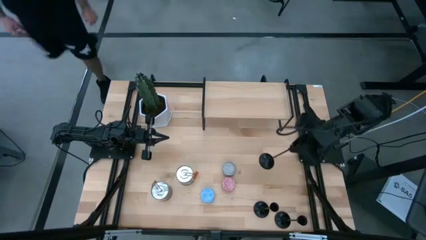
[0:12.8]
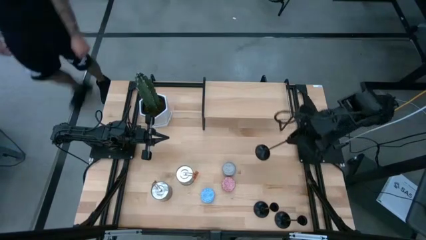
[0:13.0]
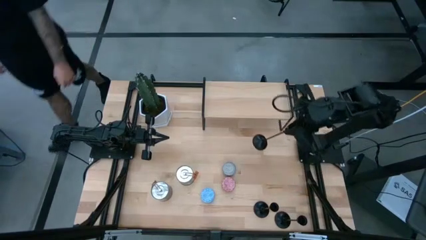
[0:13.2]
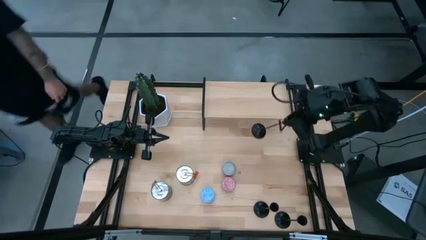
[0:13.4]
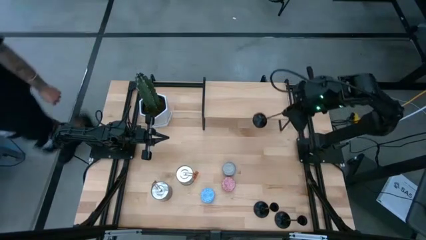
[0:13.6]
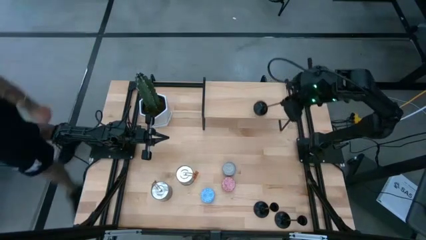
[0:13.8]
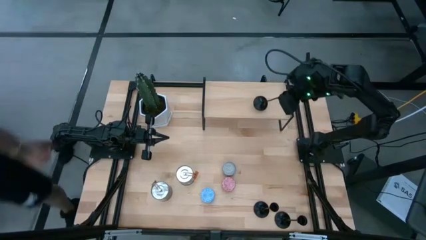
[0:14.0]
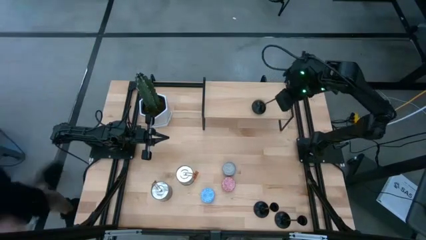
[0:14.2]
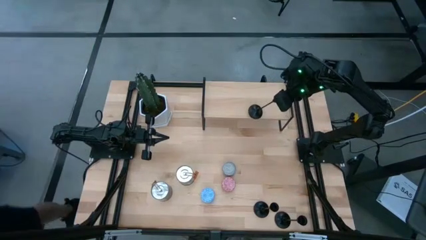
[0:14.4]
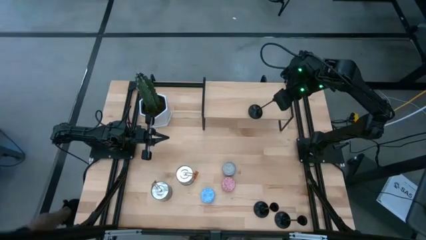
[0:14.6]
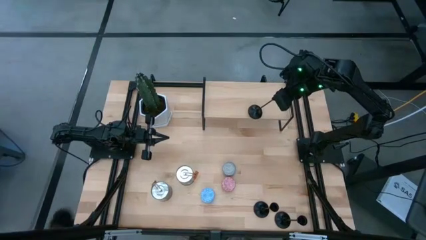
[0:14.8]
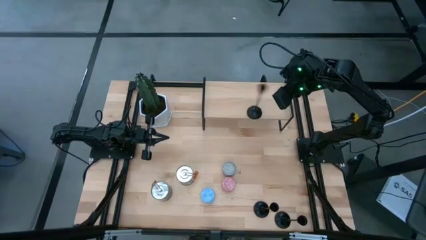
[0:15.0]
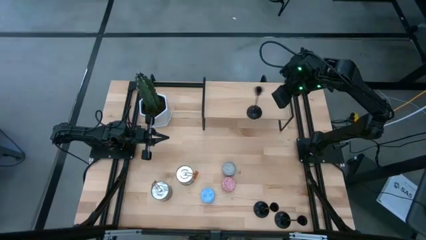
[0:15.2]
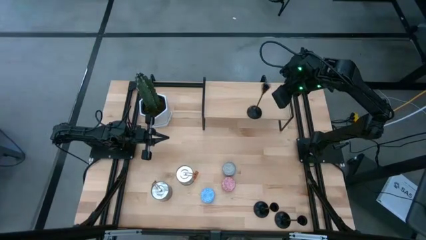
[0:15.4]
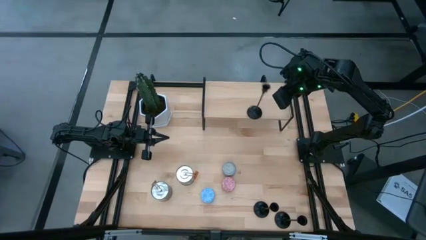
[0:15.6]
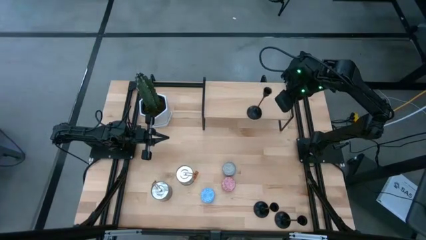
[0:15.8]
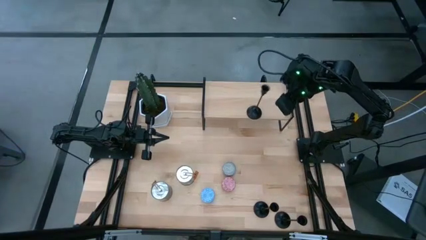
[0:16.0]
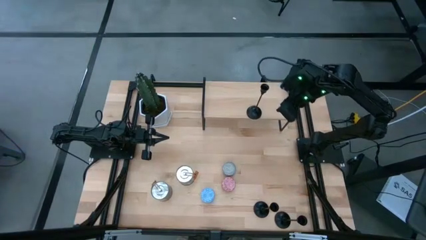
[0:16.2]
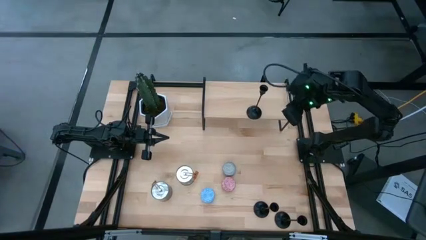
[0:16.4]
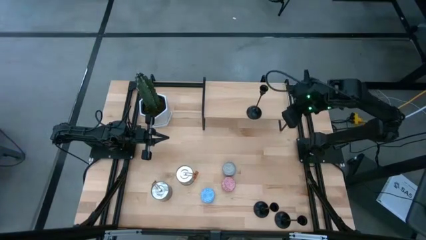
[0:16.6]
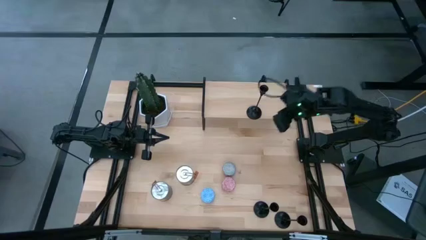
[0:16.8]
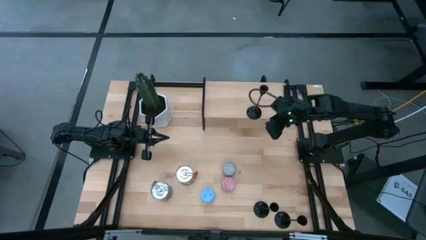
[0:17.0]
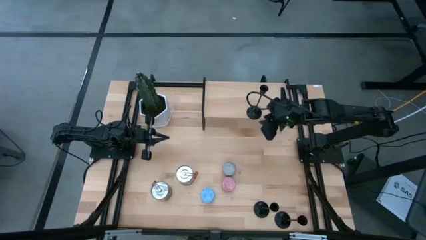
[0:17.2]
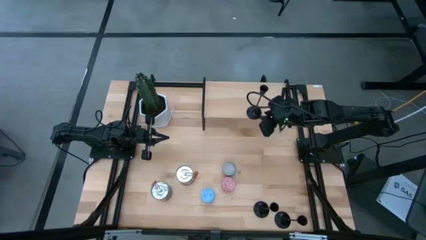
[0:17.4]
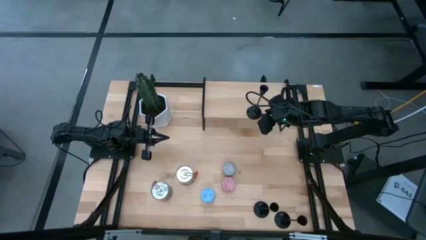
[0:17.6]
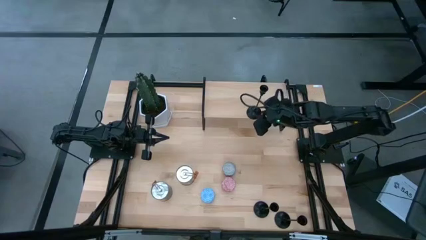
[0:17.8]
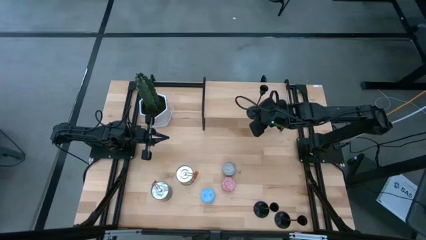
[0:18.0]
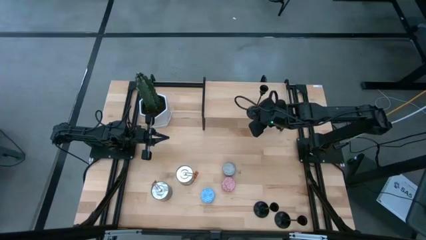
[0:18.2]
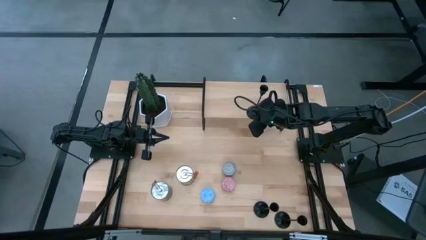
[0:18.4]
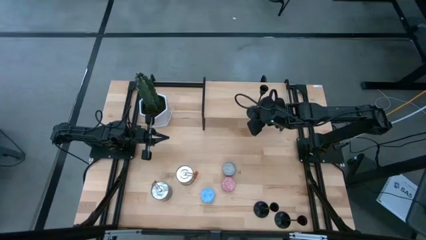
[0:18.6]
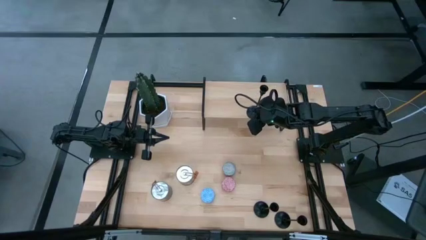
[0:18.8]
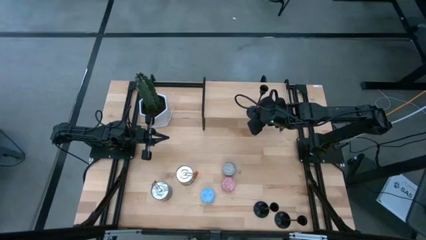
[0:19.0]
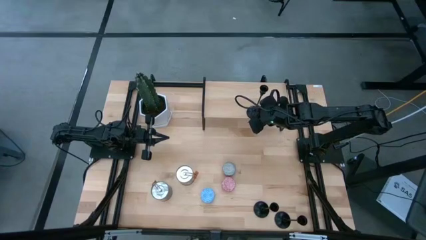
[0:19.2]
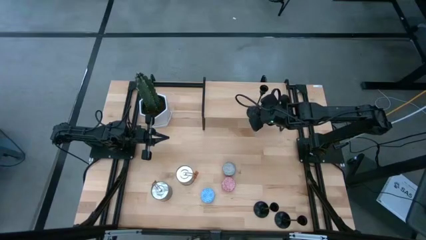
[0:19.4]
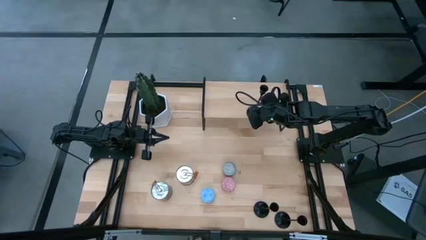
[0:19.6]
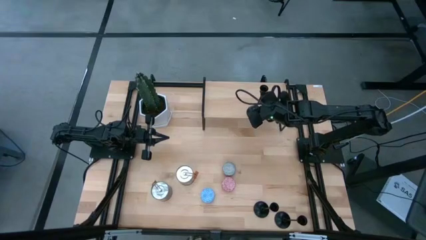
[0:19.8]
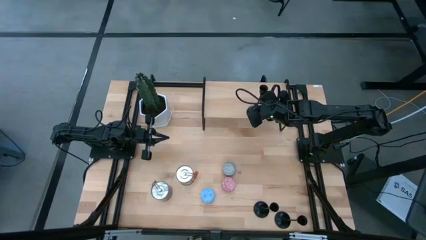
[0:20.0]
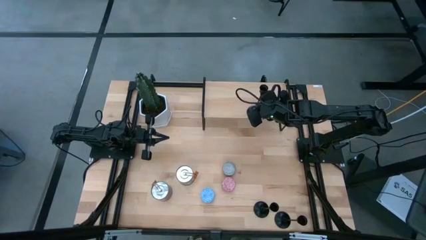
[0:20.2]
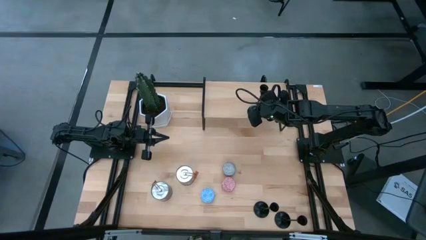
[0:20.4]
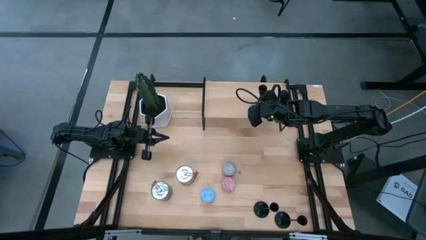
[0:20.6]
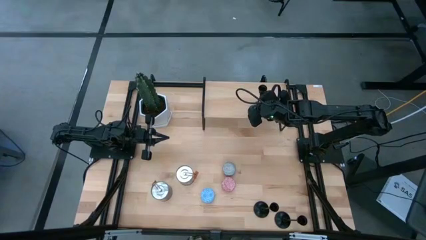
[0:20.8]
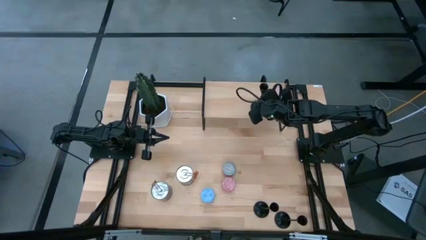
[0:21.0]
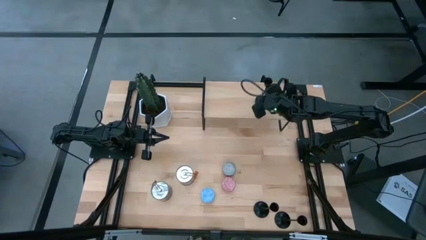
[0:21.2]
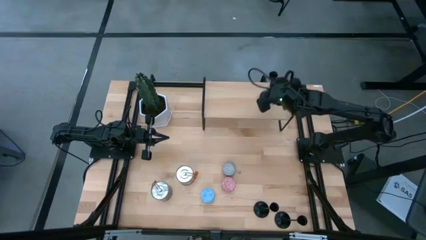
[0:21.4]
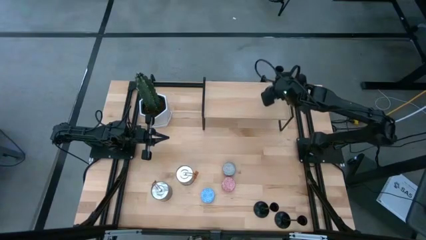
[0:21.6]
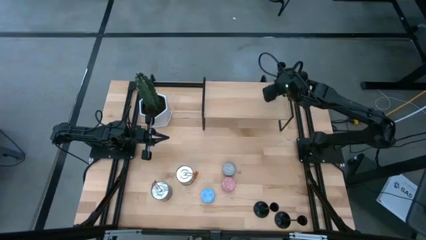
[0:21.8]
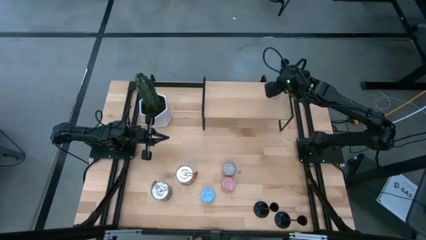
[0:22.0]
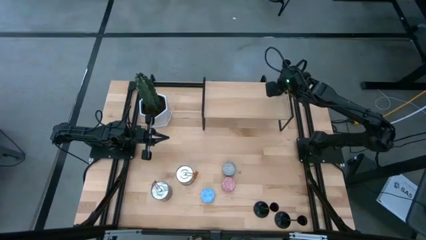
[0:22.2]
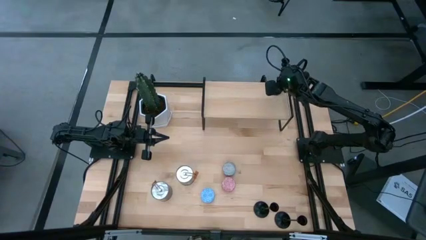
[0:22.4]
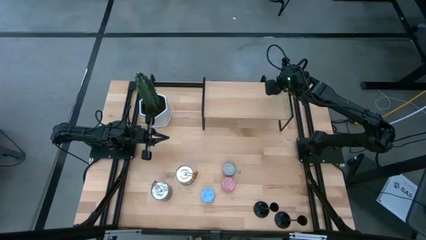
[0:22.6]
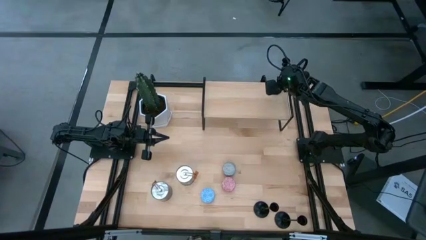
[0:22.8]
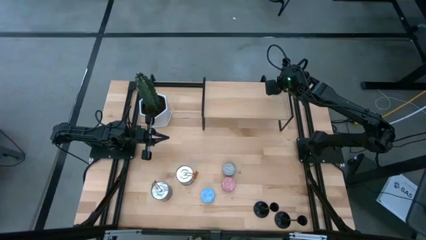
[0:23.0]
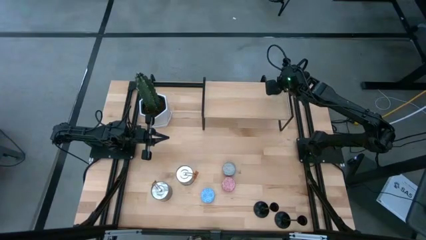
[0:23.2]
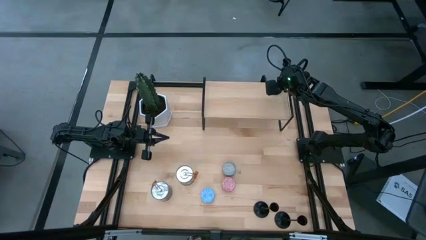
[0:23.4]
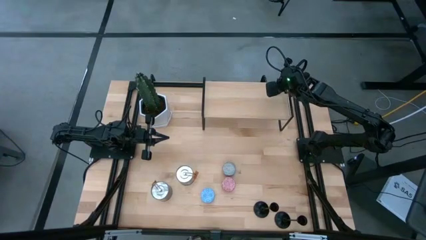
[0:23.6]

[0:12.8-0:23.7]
Task: Pick & Place candle stick holders
Put the right black candle holder on the shelf

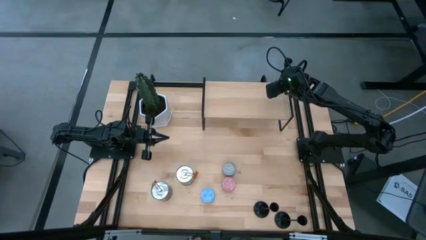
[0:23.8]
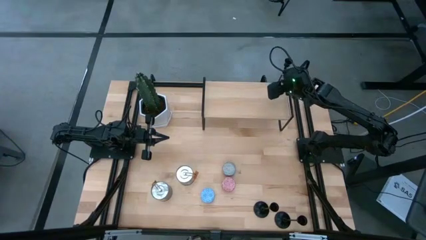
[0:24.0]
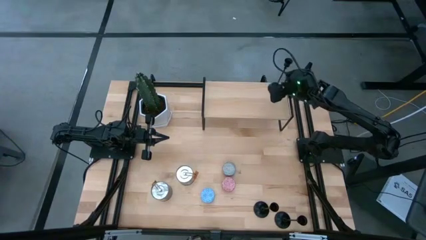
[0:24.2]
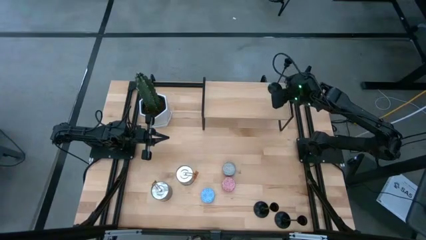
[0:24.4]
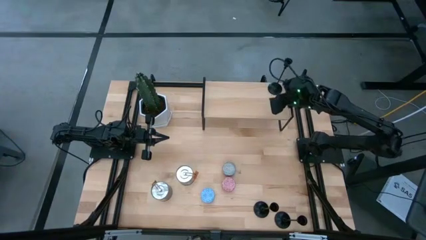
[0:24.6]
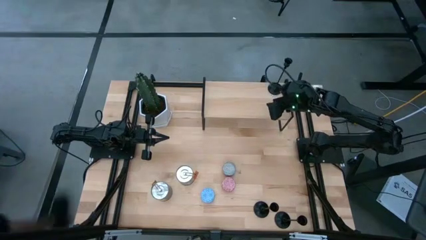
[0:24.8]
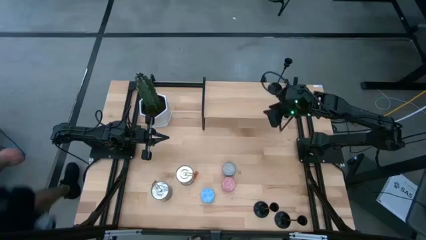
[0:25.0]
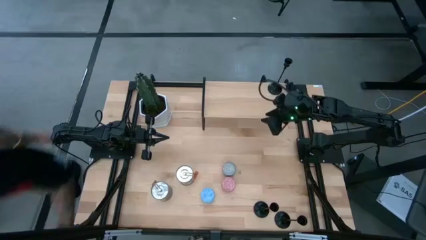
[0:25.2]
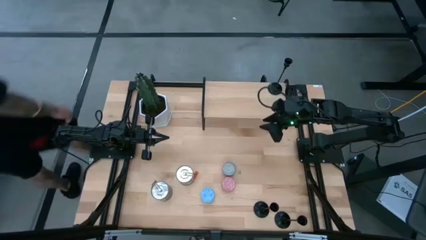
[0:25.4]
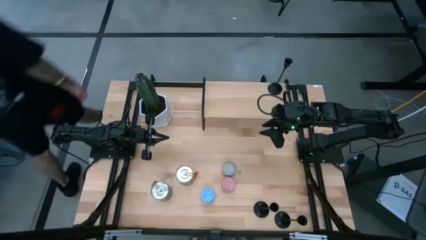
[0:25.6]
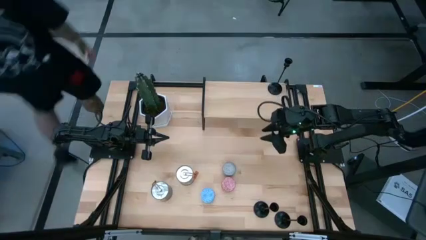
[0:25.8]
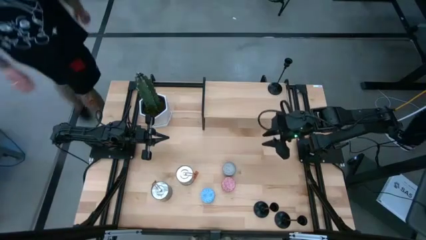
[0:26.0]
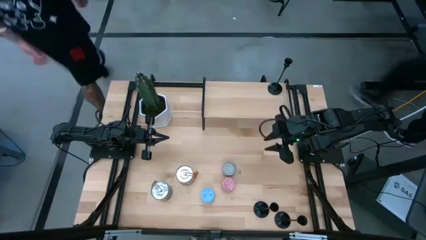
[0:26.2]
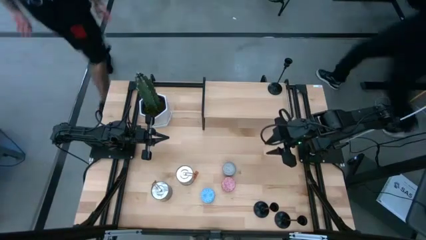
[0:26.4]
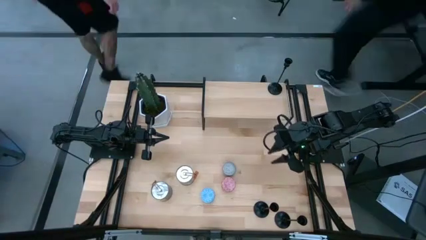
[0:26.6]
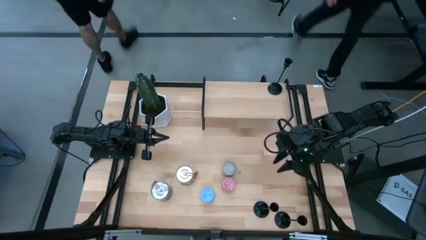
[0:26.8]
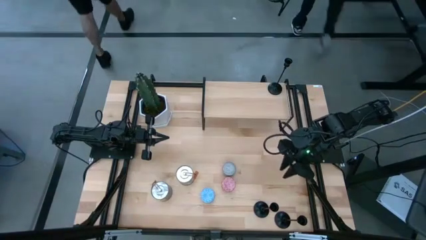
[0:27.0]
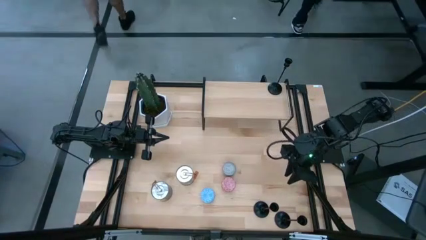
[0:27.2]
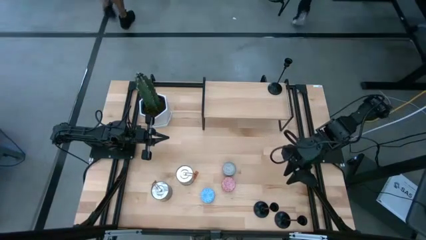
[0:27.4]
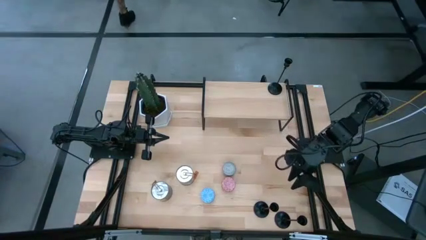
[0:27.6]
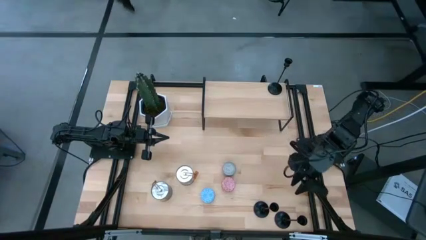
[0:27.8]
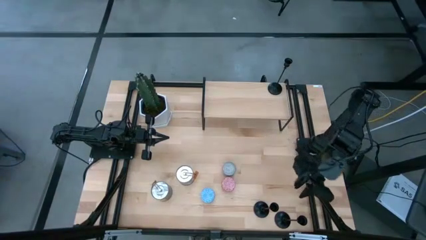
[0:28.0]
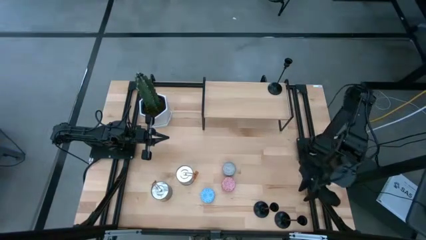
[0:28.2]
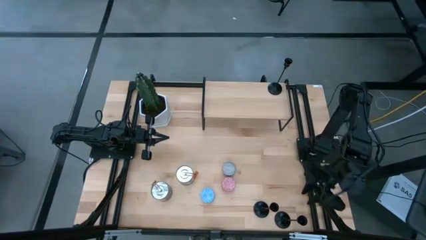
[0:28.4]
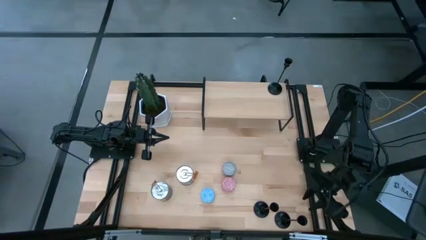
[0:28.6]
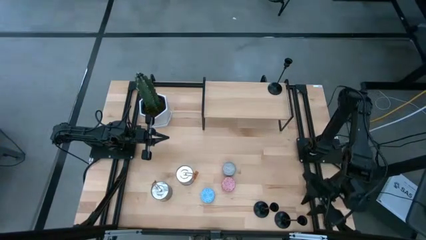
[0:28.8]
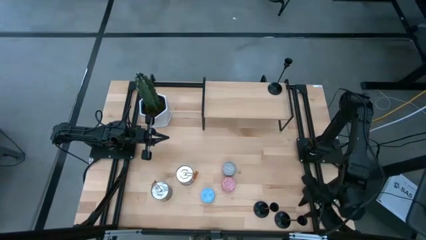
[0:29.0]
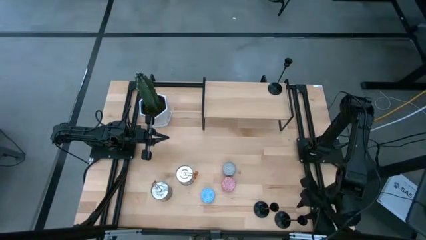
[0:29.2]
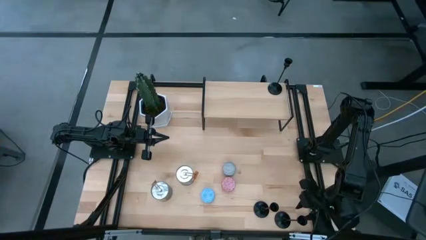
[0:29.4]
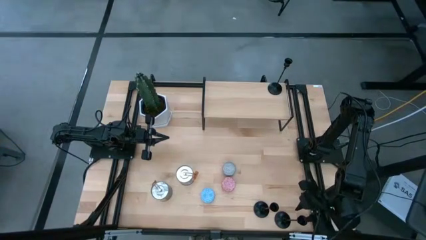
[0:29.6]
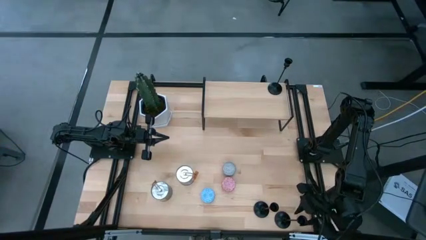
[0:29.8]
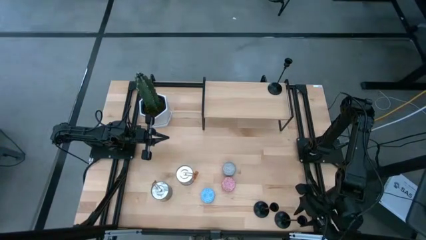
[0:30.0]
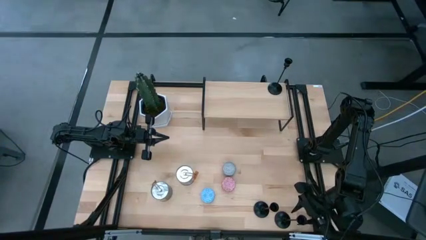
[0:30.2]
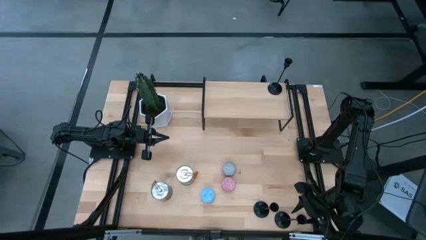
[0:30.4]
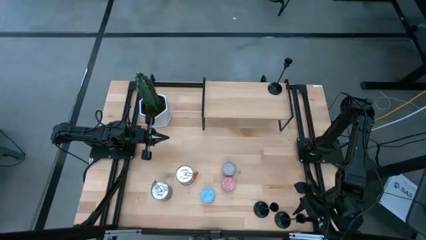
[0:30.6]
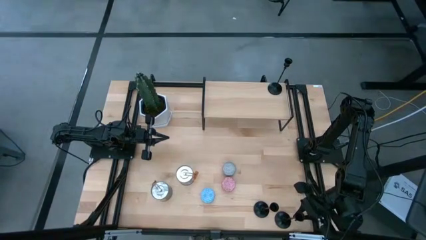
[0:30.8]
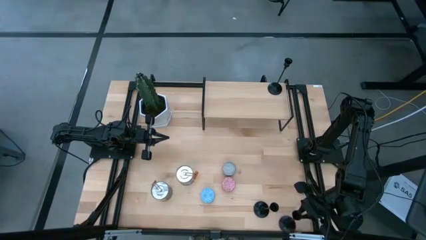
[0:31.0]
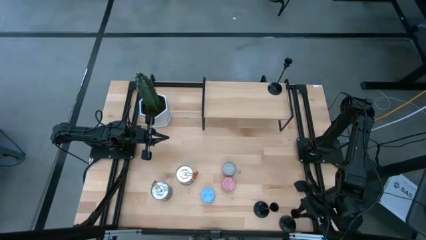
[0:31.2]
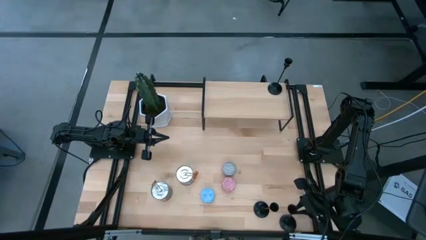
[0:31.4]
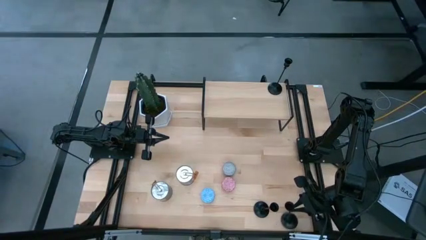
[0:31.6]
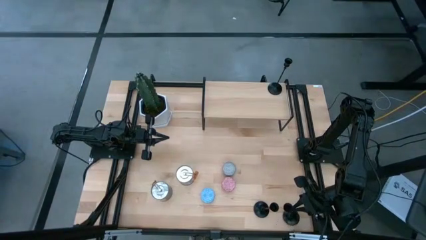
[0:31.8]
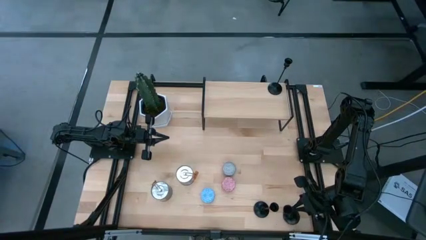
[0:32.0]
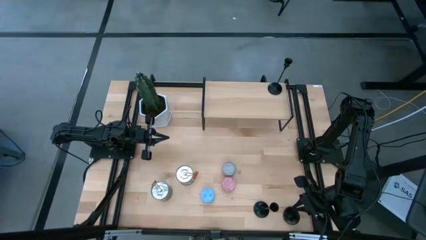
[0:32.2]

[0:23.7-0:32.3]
Put the right black candle holder on the shelf
